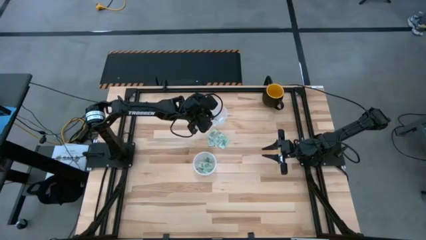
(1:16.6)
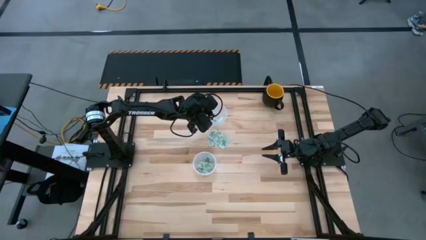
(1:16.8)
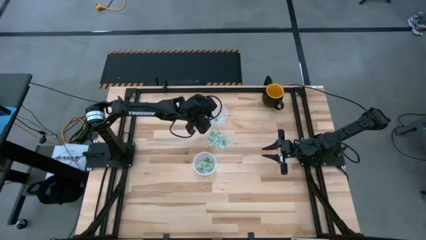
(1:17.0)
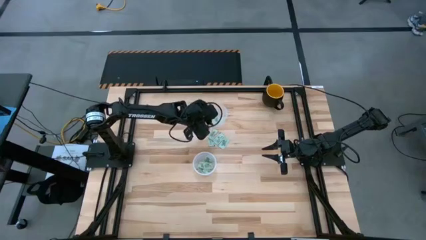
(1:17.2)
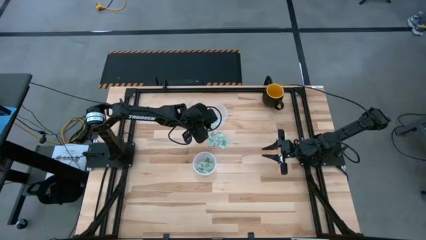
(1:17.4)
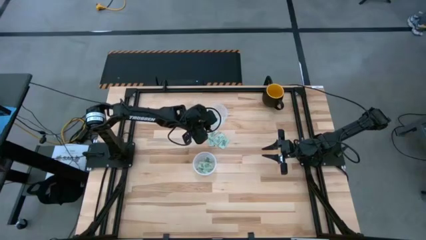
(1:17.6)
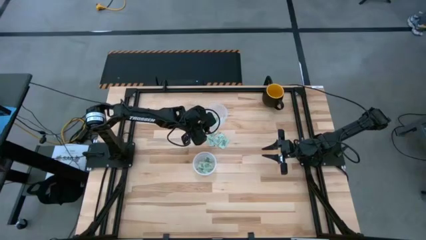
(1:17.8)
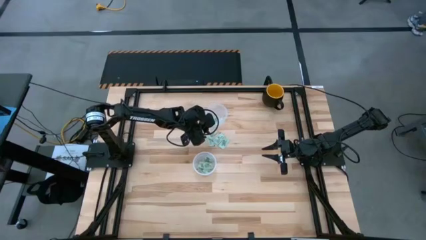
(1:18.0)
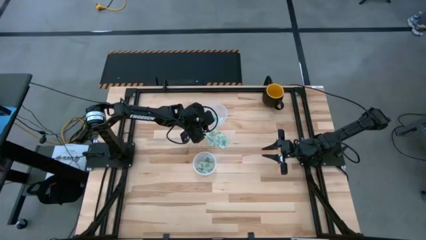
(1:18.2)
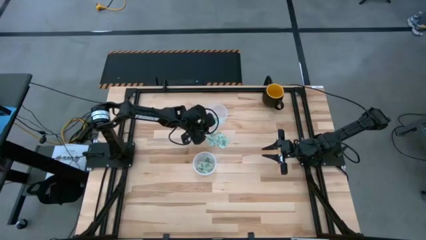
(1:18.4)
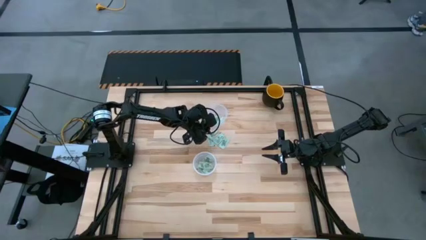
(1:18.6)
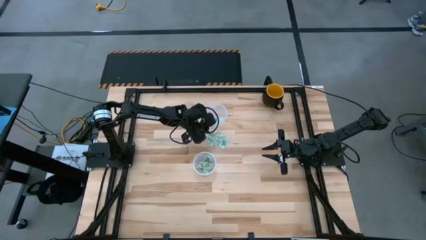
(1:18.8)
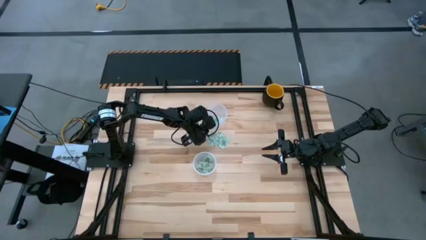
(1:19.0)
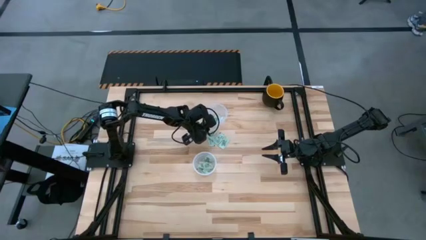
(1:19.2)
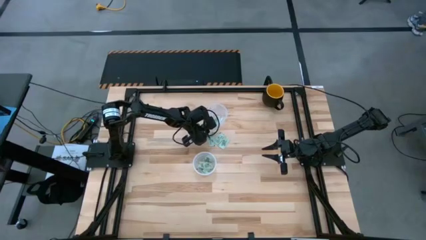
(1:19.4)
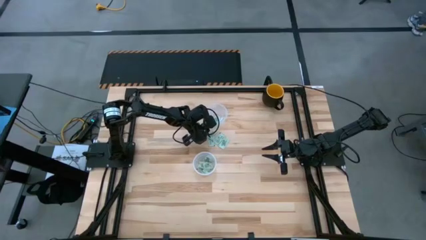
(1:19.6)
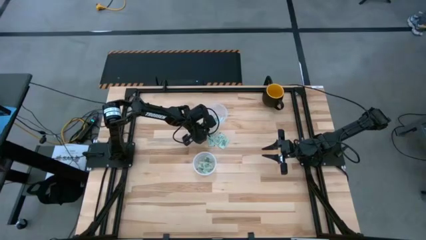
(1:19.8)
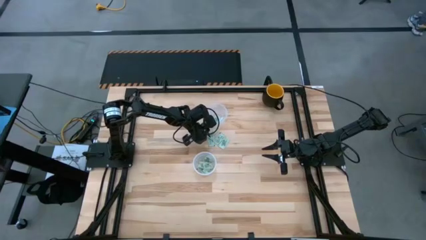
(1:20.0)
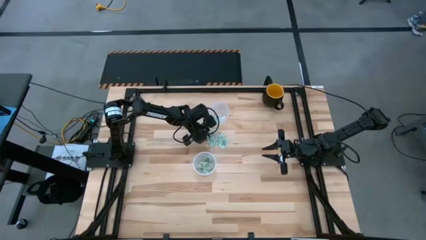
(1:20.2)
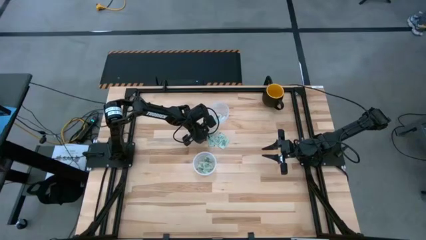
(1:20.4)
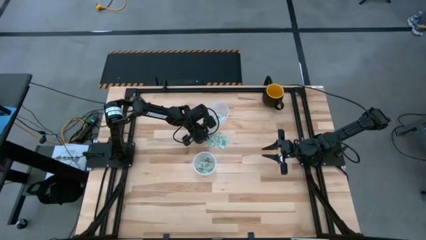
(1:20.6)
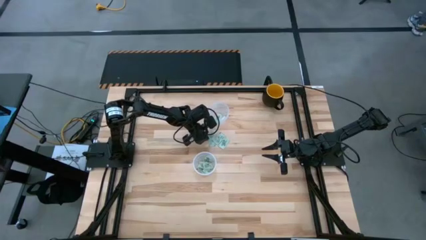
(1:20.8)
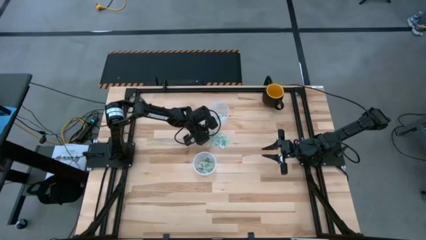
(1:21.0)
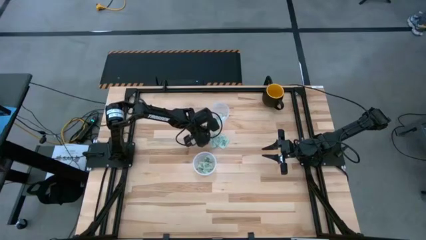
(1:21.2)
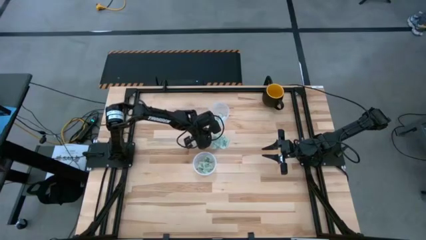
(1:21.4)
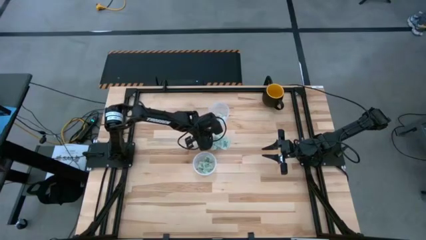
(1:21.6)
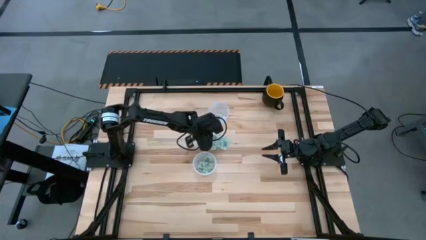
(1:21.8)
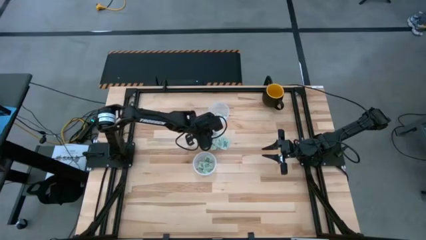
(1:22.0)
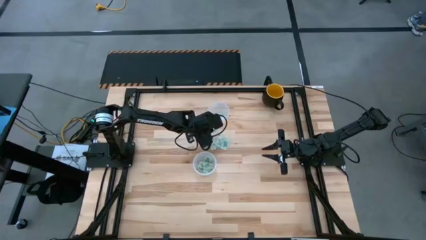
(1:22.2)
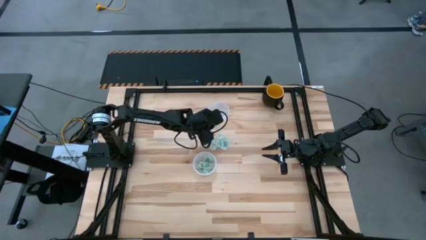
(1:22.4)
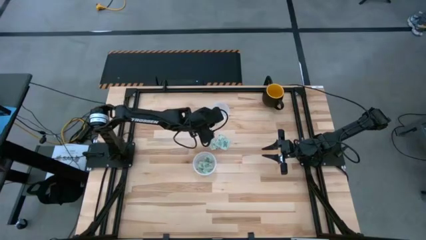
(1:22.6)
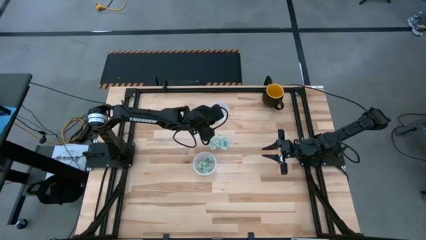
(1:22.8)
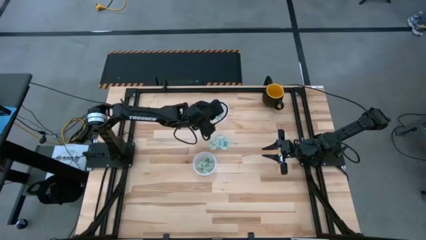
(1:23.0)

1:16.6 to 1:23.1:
Task: Pick and place items into bin
Put the top left stevia packet into the top bin

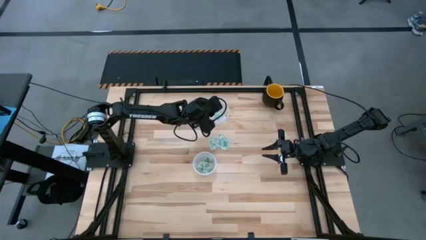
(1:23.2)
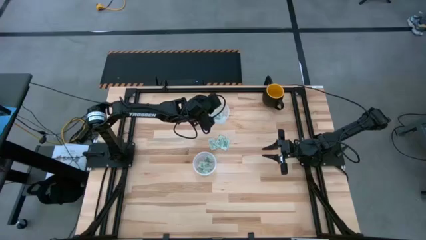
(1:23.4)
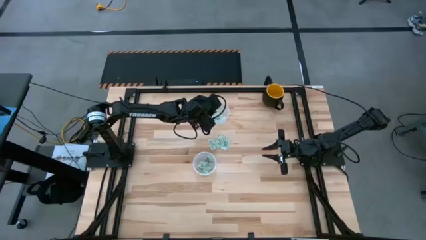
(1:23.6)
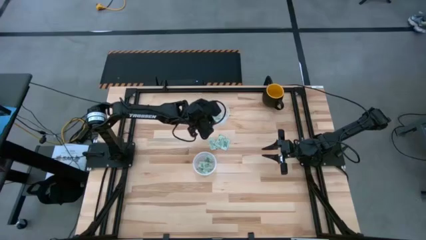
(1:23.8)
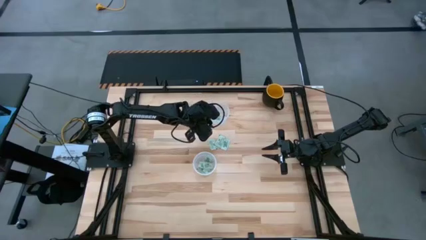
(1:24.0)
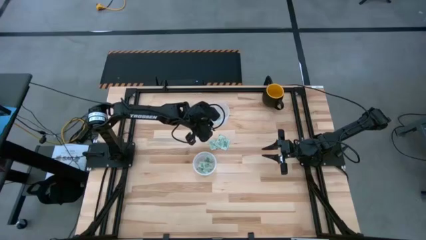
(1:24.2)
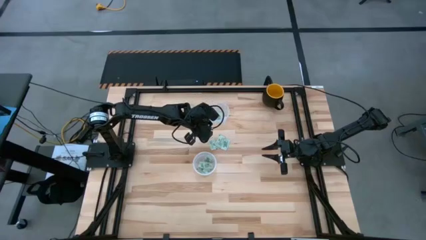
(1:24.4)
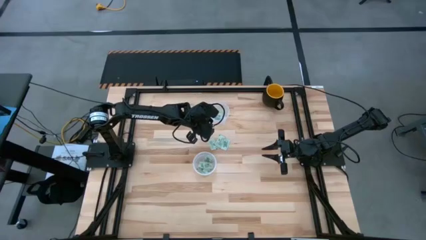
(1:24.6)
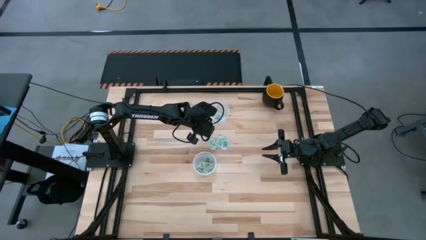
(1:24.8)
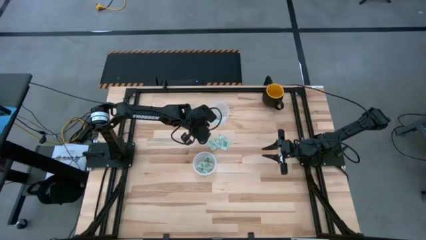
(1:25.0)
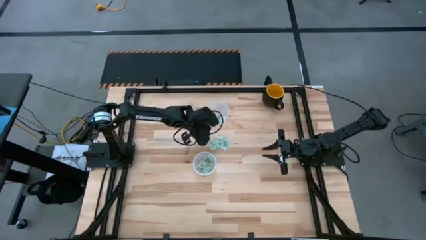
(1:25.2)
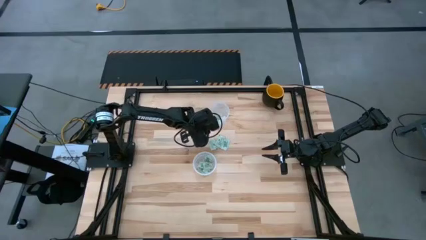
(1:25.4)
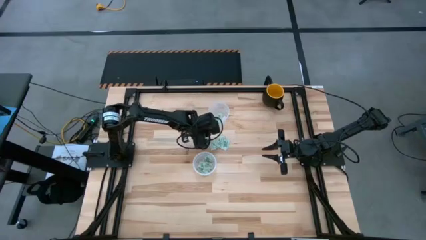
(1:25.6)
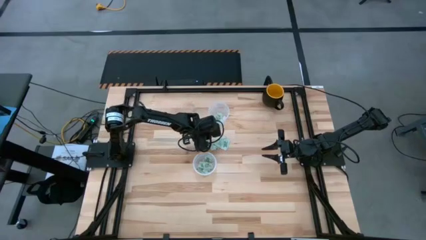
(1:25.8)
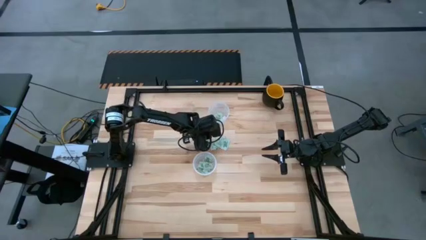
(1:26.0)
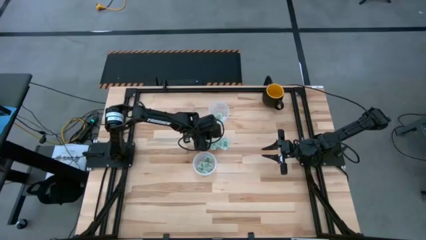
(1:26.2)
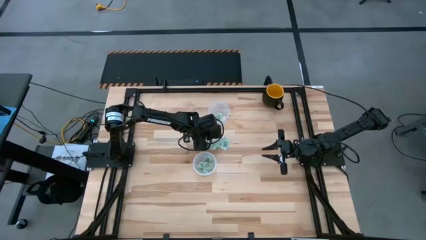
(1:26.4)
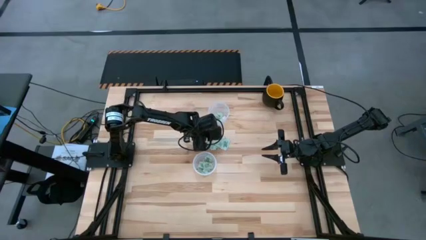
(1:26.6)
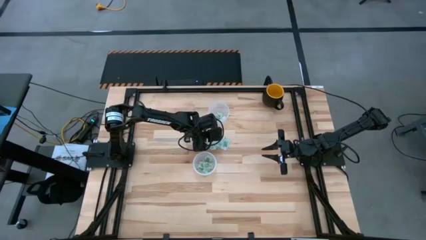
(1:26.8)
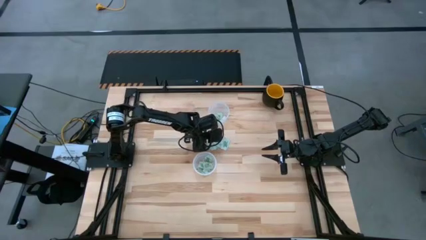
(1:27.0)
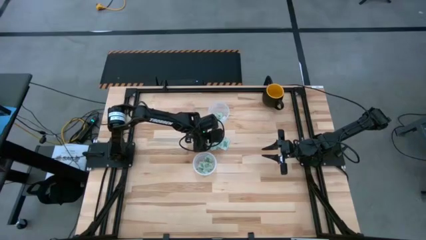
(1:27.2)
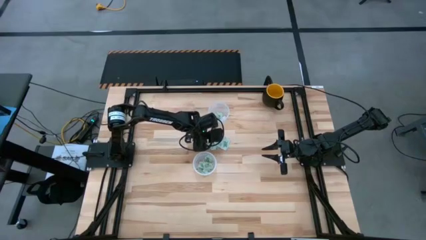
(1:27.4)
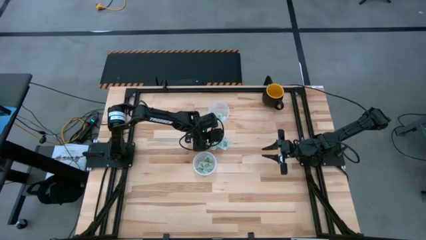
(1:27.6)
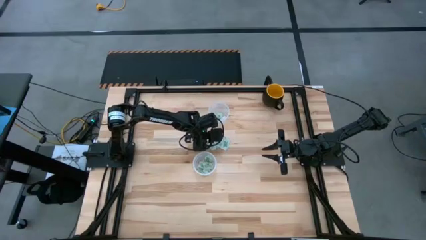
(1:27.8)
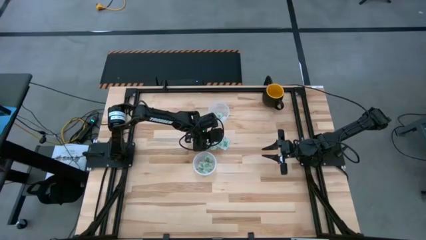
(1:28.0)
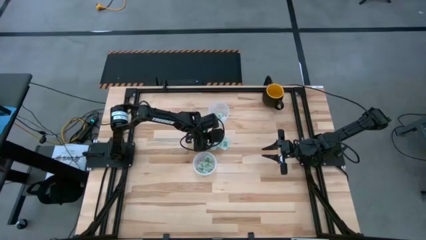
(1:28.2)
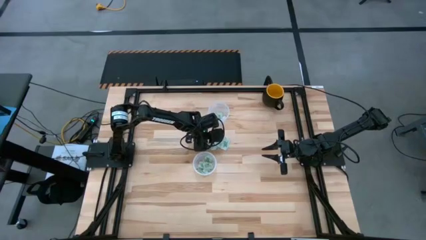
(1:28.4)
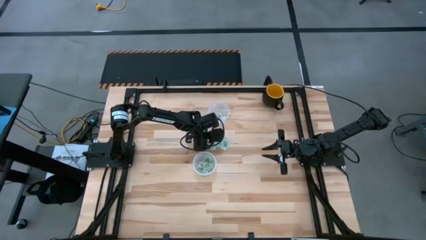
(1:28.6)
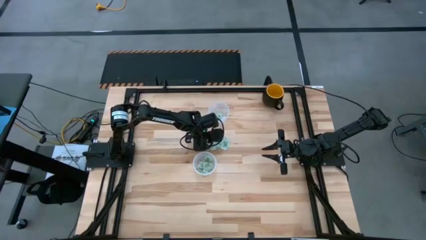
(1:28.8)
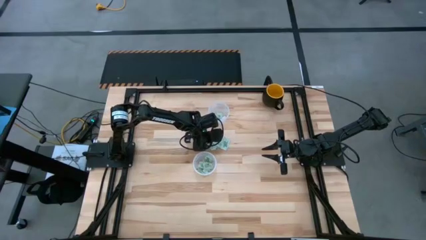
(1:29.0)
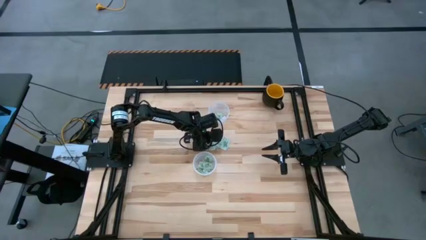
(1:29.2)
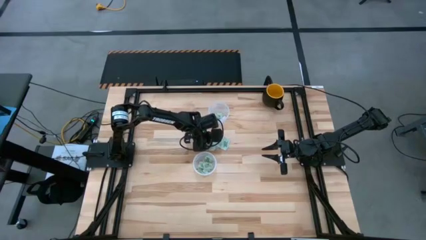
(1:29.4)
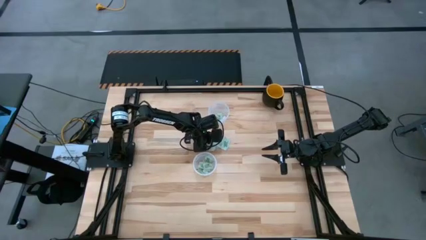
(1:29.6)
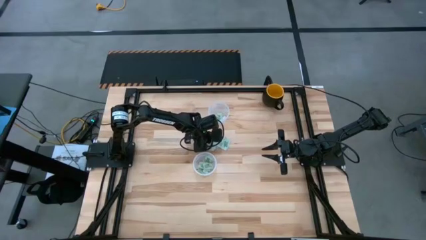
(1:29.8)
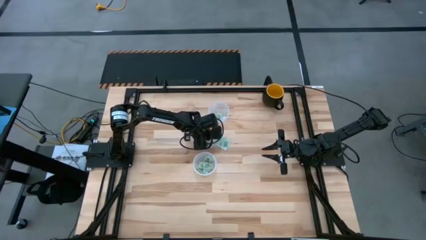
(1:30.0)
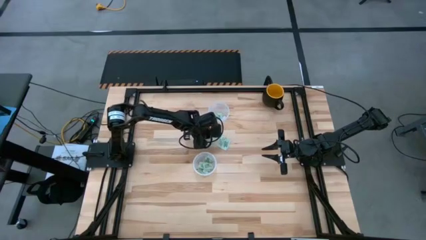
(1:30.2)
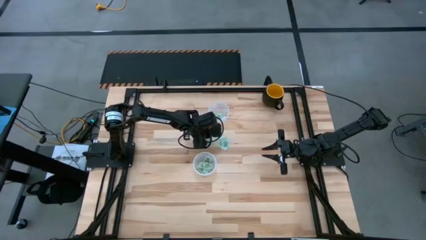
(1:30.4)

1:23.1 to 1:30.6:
Put the top left stevia packet into the top bin

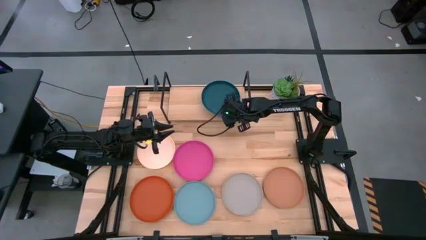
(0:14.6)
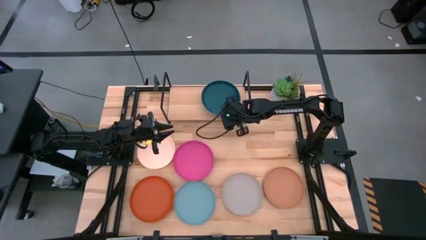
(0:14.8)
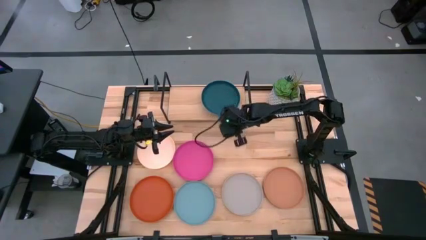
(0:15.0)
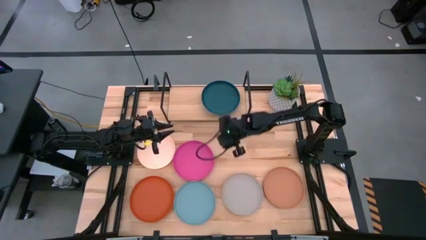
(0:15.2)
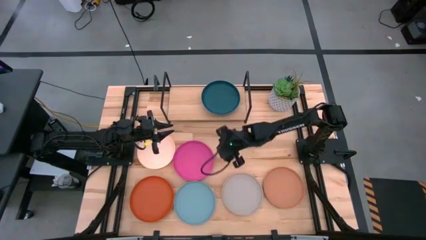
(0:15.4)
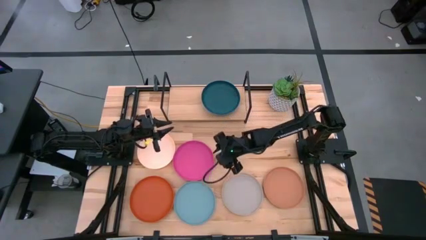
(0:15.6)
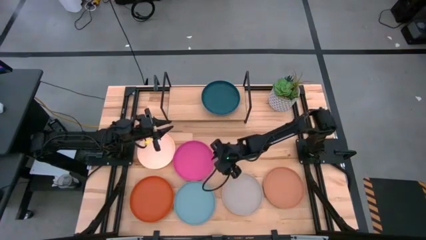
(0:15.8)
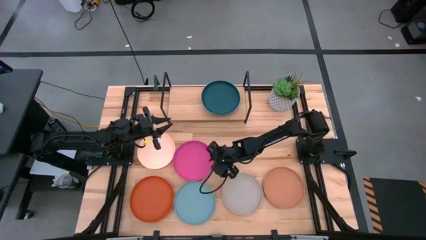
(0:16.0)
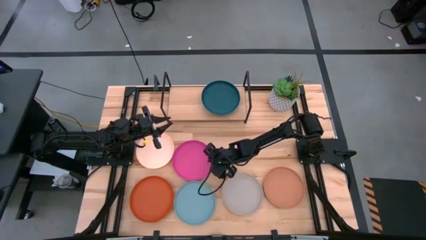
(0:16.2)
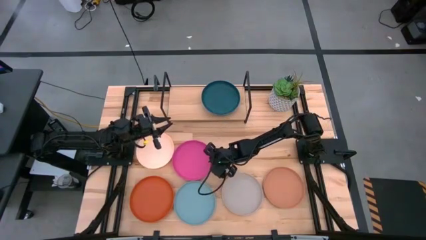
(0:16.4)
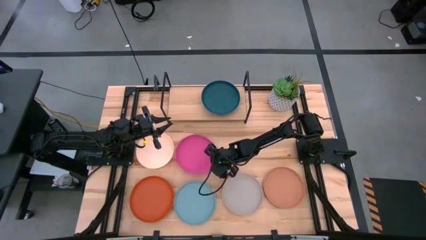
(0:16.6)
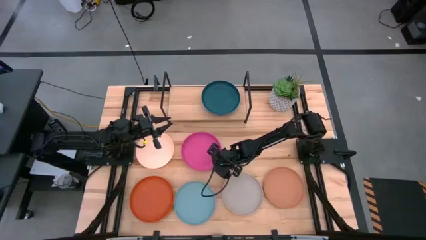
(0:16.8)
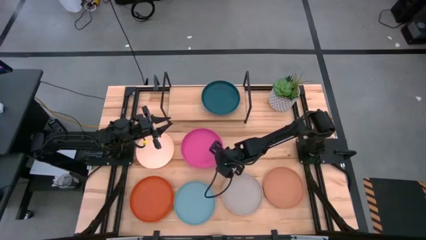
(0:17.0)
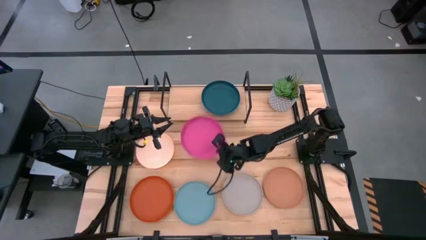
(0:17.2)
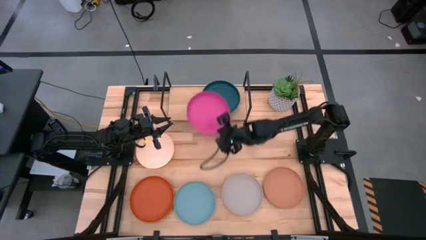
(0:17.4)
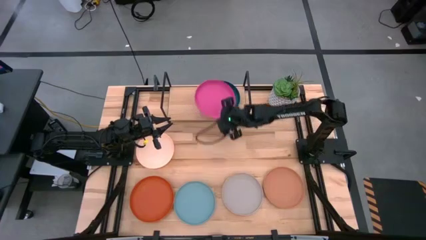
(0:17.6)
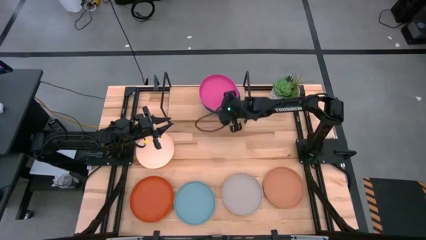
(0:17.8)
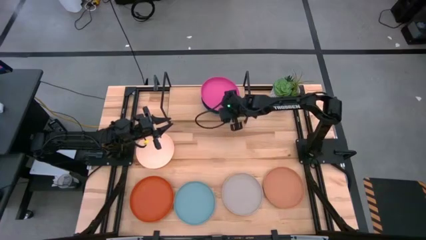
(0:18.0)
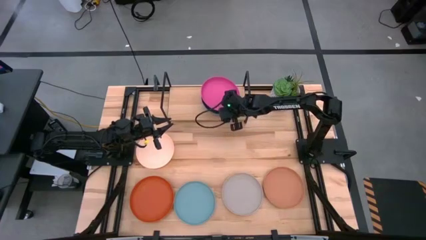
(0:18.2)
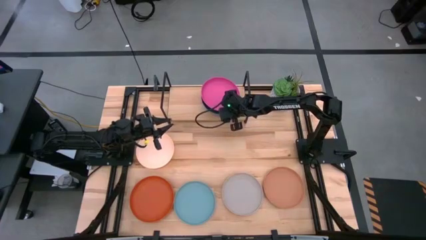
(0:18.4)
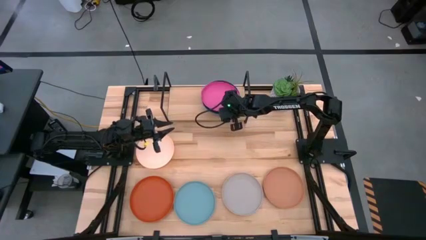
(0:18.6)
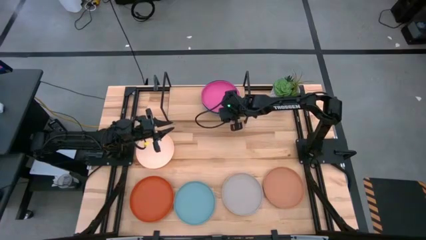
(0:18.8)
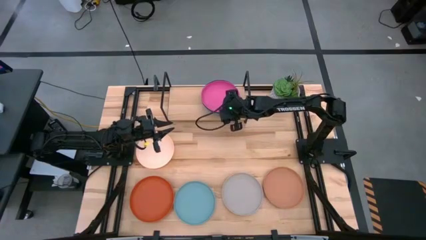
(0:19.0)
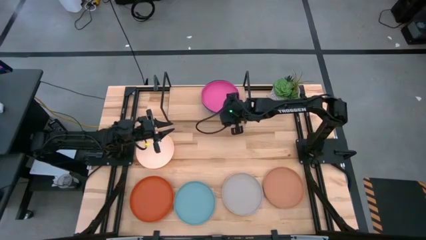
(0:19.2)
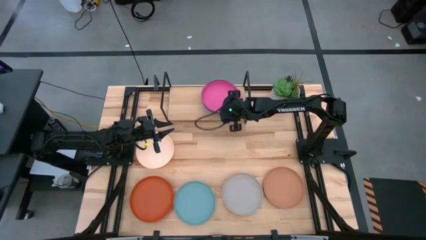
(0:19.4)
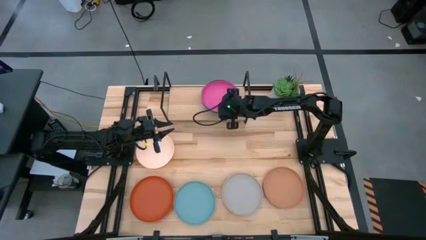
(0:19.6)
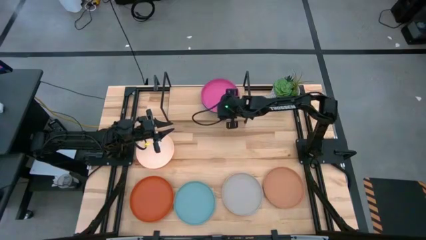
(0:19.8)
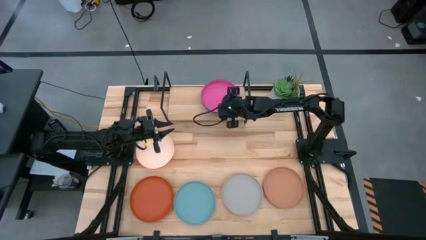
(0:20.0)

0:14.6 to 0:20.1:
Task: Place and stack plates onto a shelf
Stack the pink plate on top of the dark blue plate on the shelf
